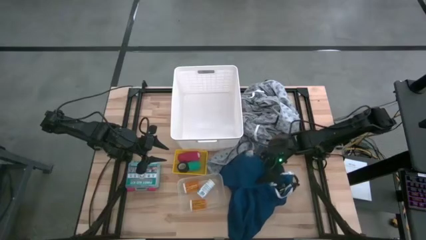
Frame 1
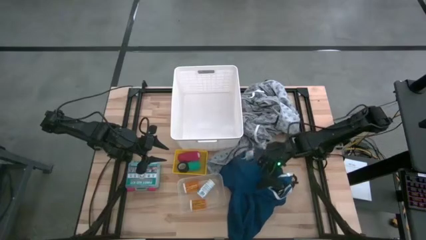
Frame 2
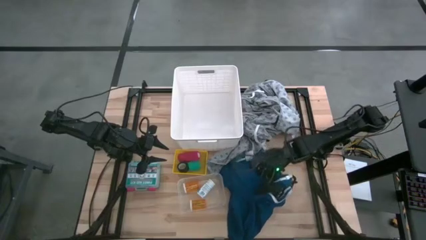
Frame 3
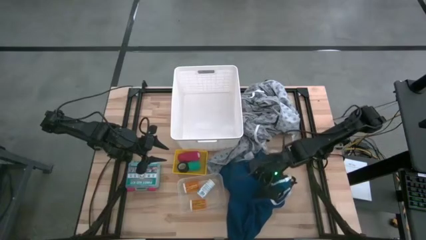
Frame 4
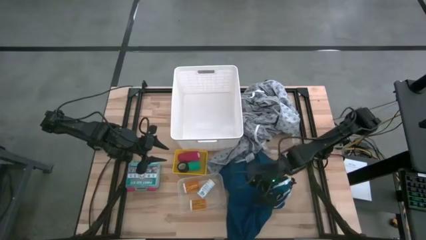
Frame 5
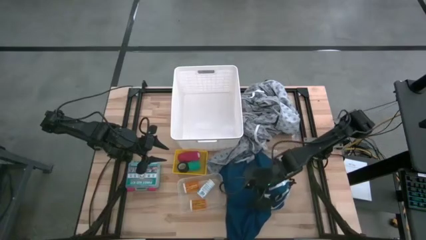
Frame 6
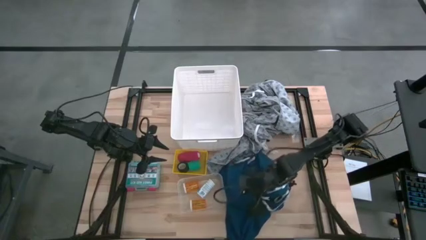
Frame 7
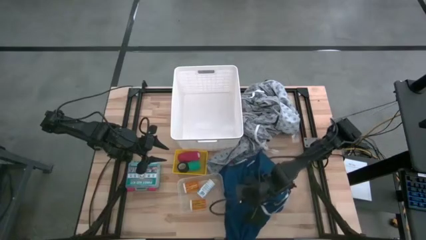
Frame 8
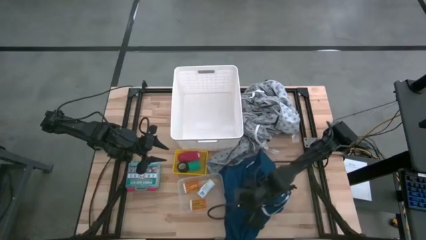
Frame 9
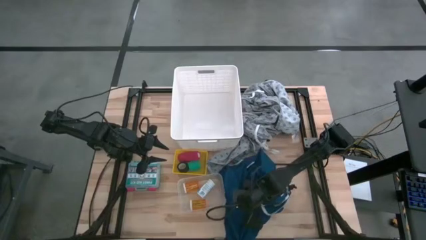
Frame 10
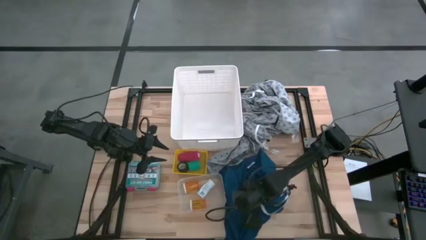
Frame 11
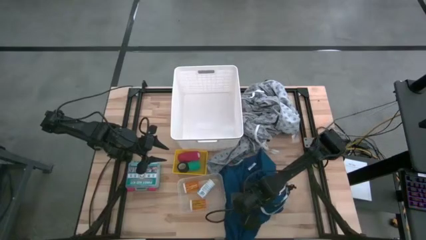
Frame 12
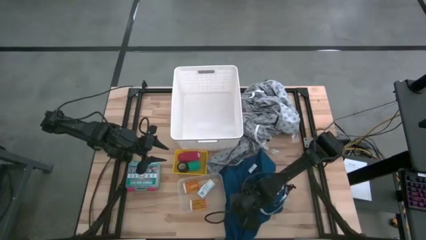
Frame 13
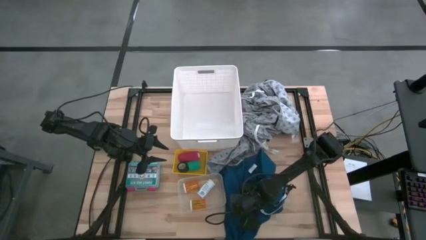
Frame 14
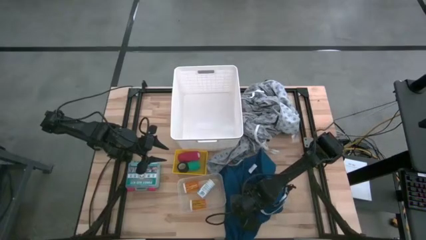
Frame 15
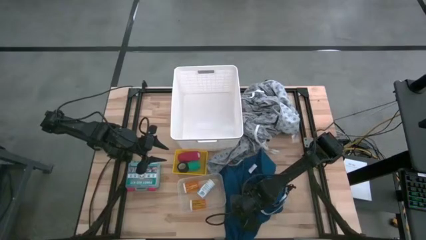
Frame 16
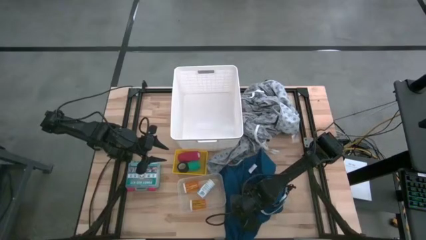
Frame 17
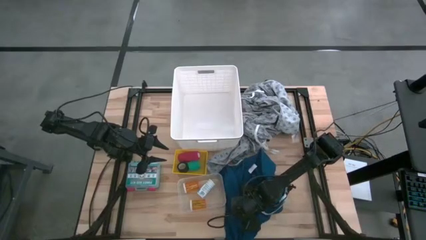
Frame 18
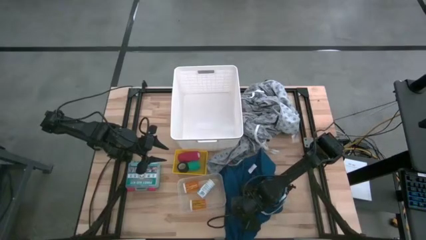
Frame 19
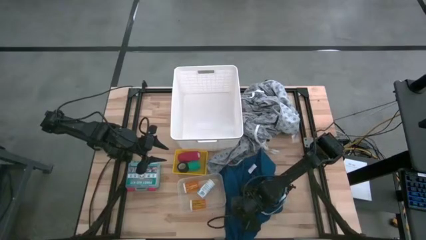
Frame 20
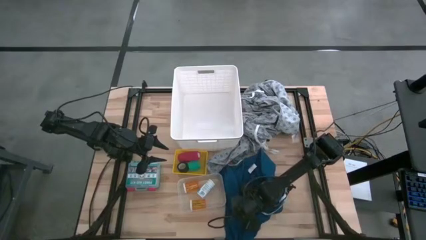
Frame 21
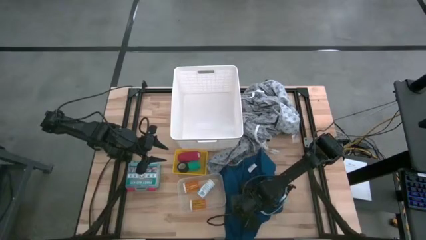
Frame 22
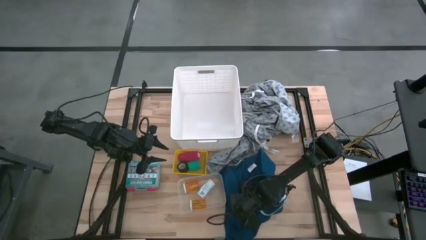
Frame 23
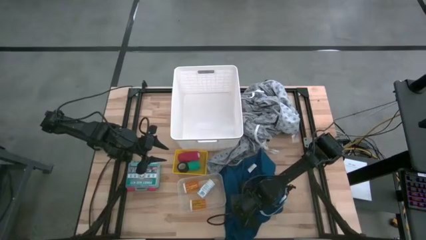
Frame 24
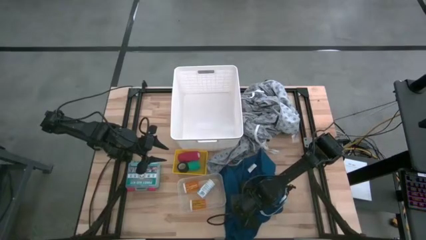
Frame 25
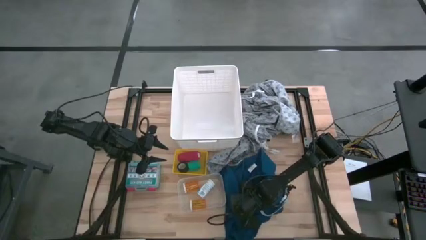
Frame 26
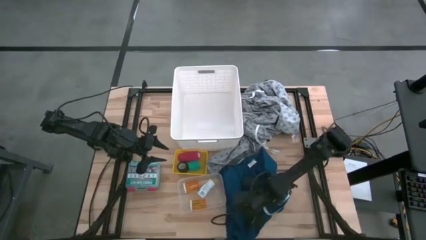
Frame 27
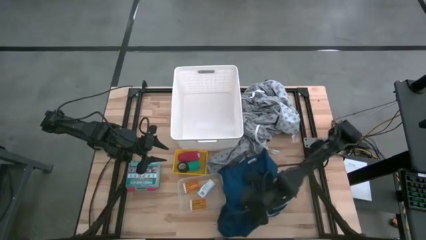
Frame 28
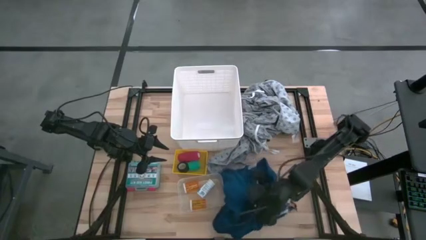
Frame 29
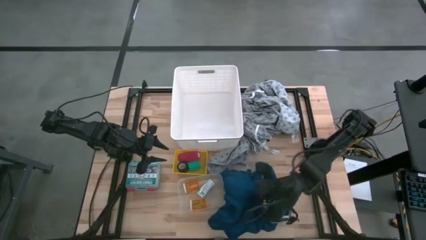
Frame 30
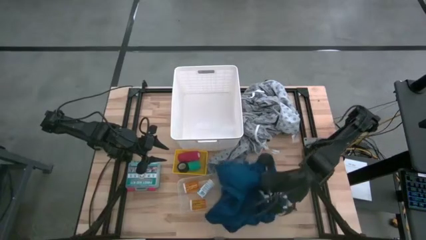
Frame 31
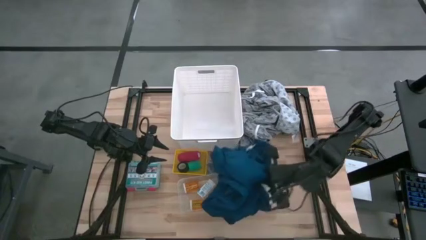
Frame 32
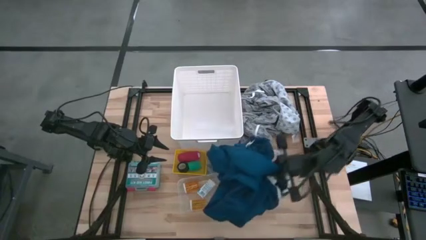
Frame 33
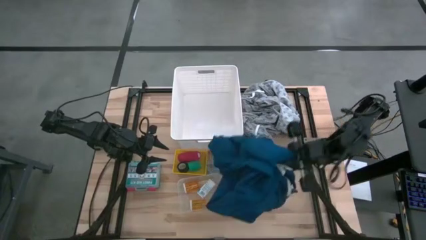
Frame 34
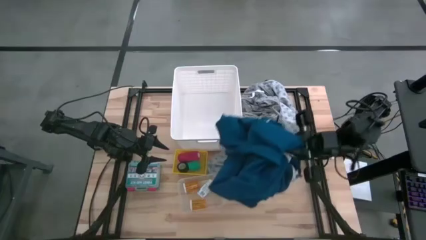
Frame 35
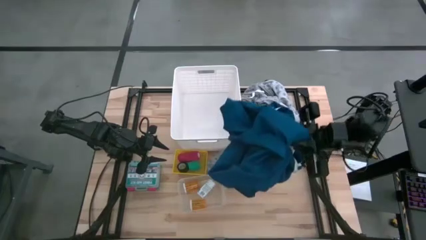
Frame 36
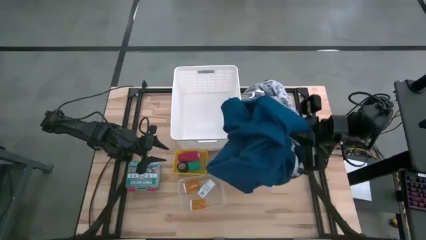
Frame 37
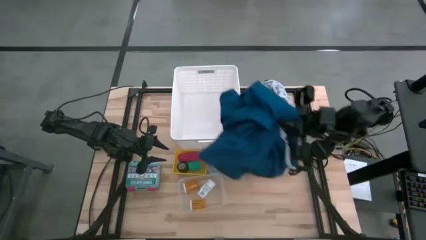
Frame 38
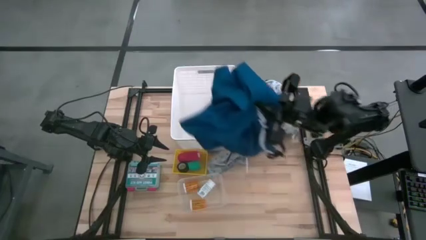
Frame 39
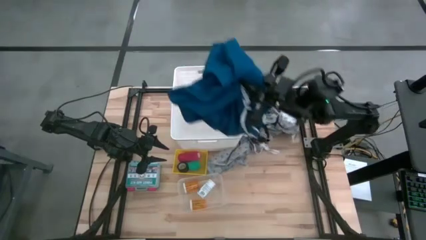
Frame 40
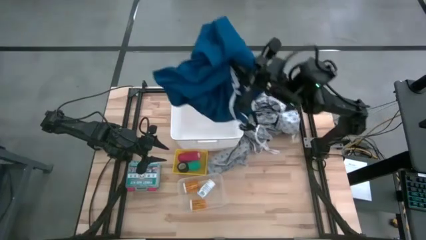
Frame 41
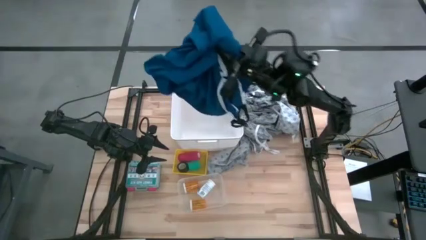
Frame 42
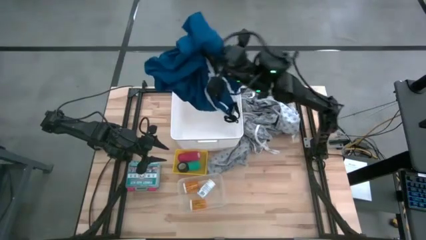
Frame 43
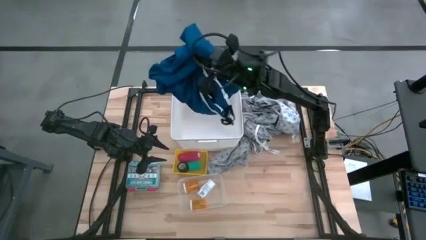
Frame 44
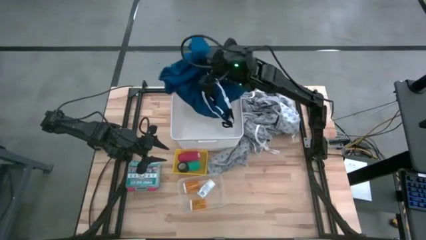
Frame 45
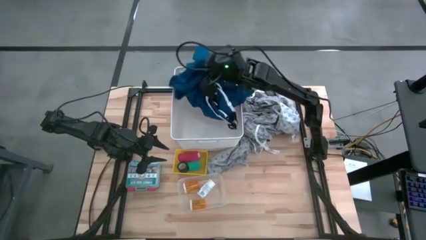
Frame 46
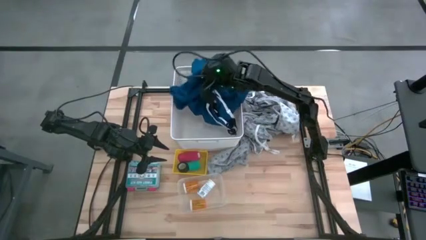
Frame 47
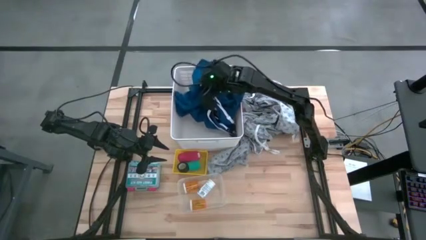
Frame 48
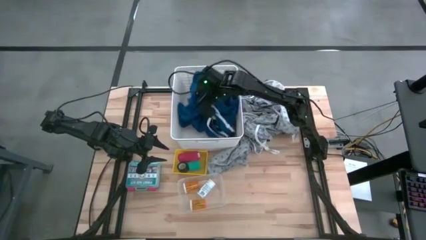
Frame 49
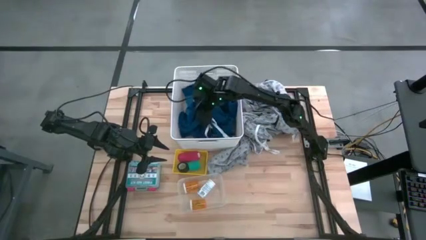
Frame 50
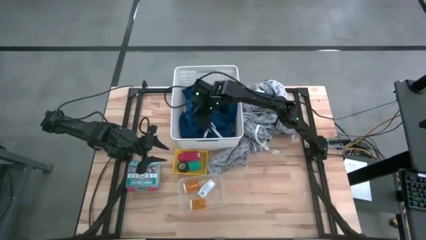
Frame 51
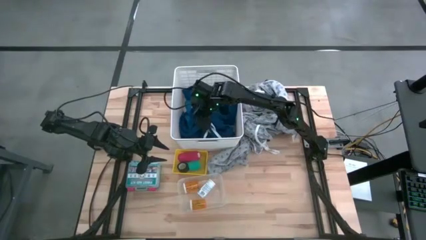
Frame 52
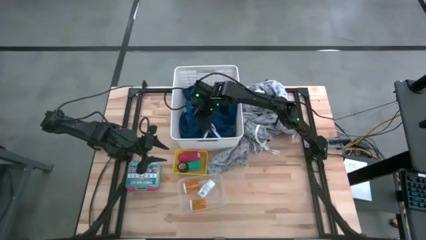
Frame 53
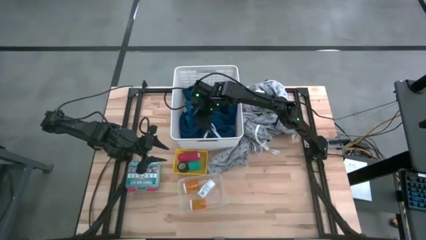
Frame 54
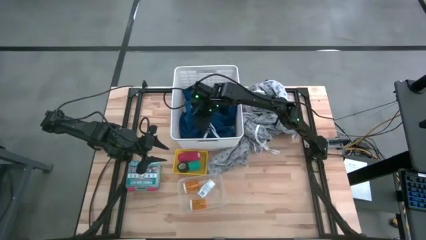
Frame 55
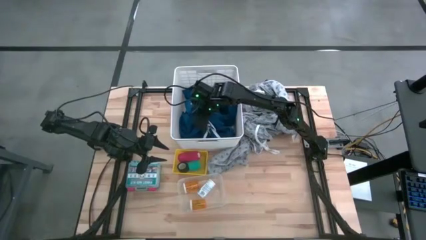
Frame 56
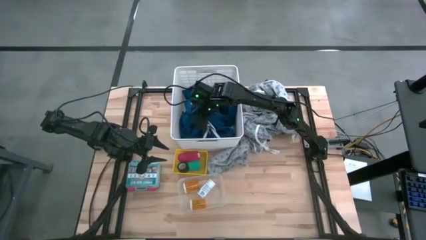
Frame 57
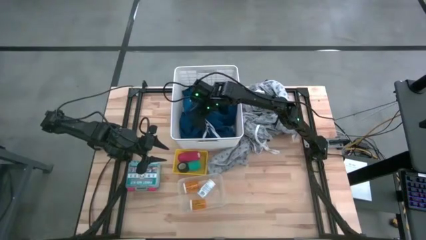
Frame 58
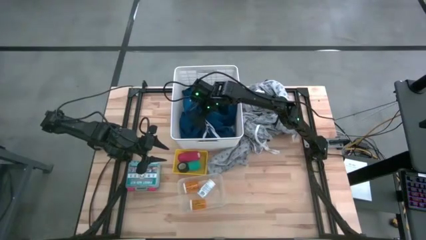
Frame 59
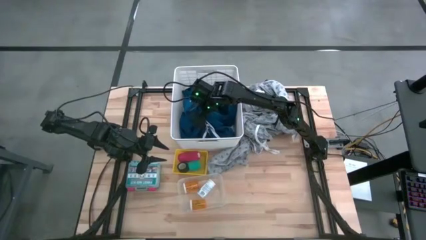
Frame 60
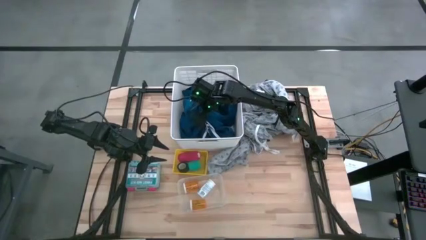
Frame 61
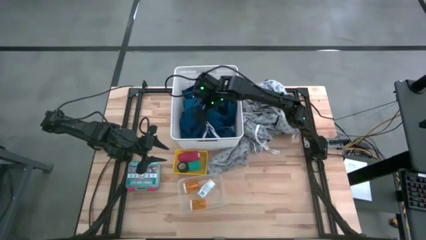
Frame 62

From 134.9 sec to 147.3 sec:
Task: Pick & Place Medicine items
Put the blue lapover patient gown into the white laundry bin
